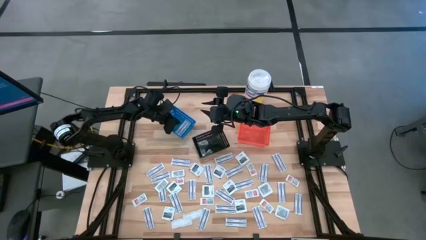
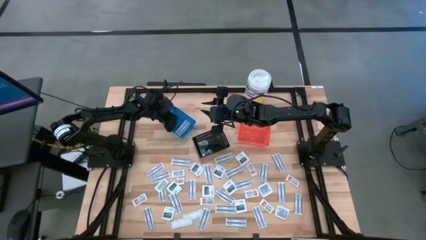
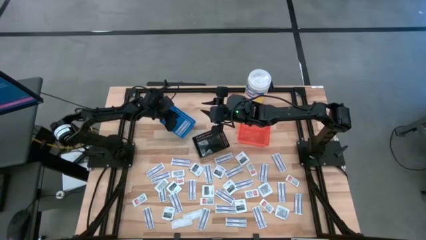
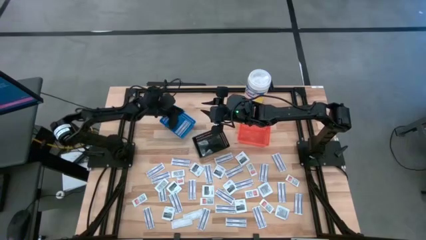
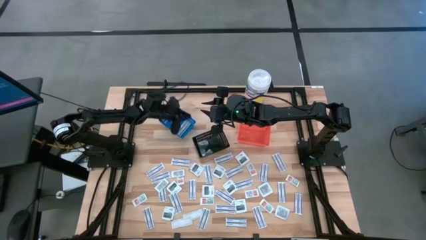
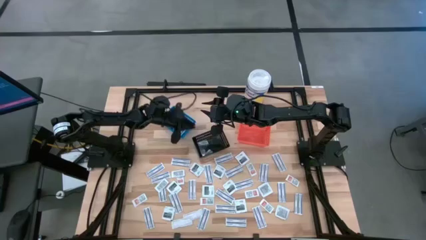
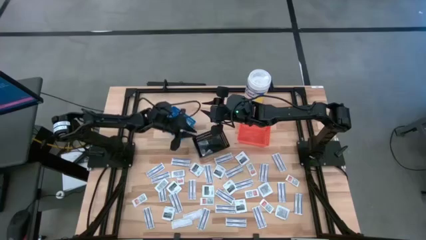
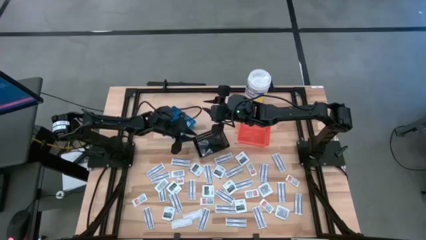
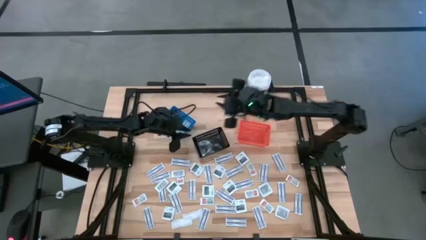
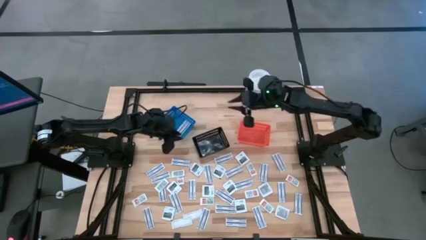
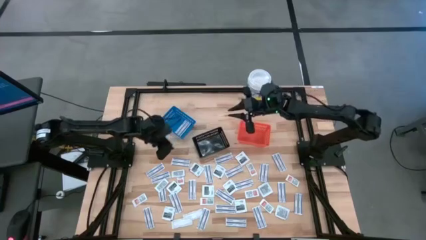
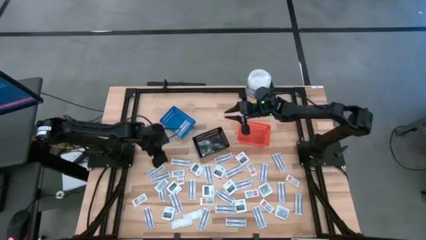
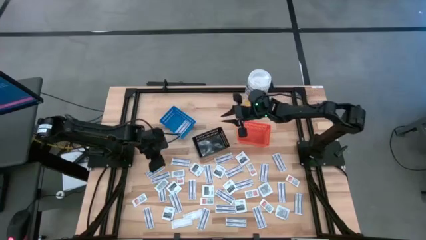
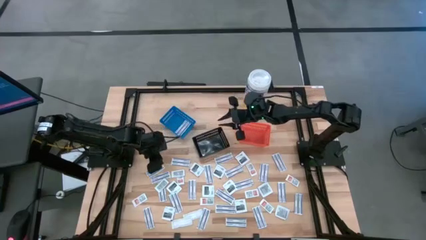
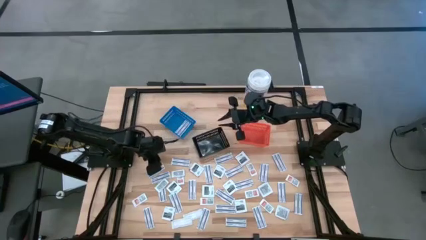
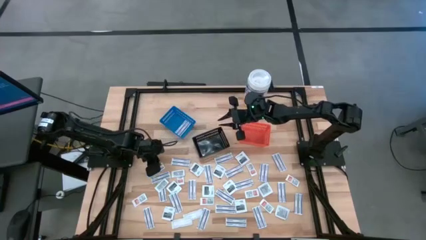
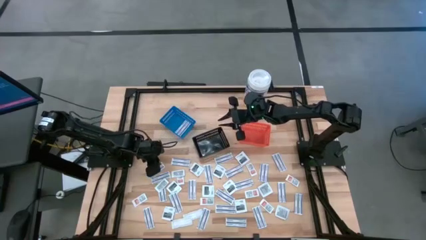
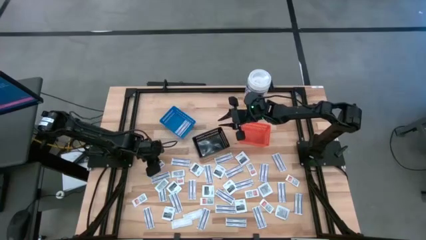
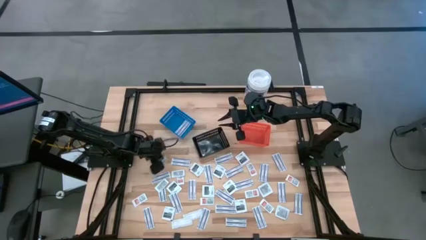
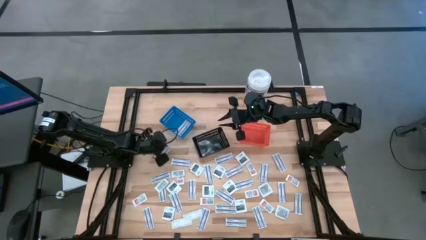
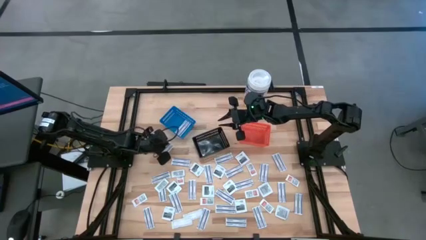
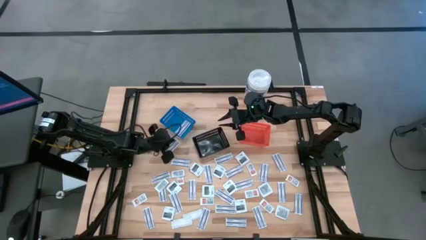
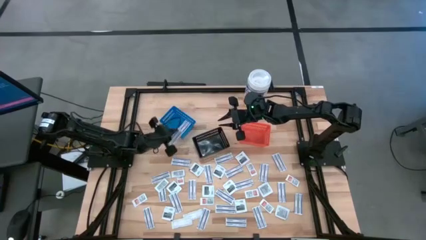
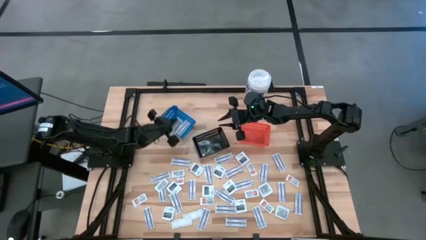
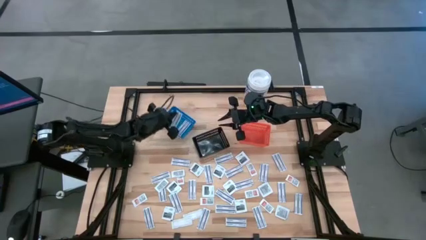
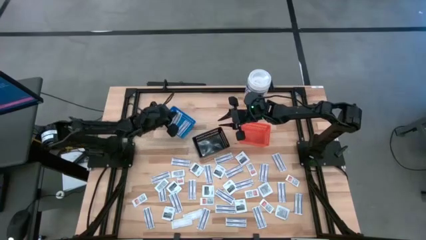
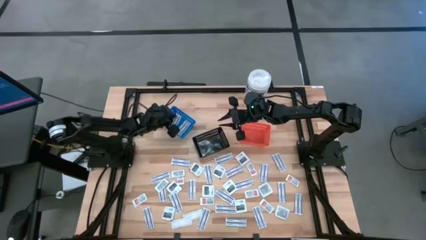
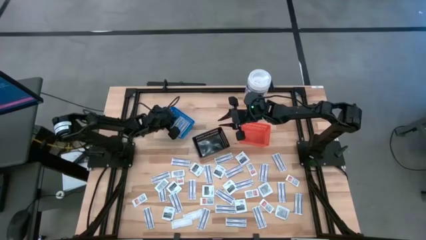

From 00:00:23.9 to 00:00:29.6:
Task: Pick & Place First Aid Supplies
Put the bandage into the blue container

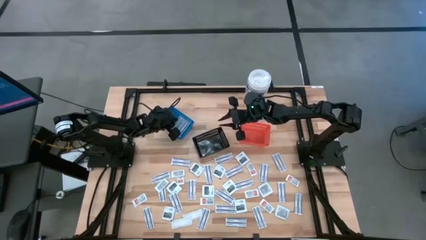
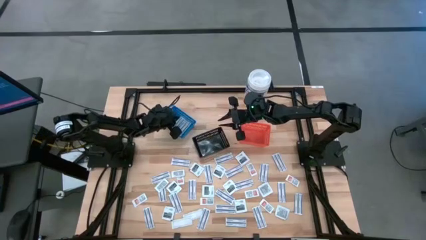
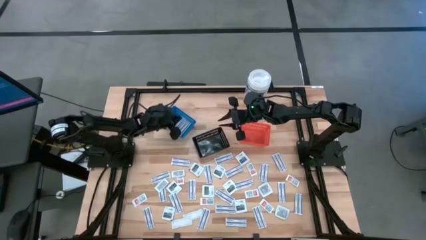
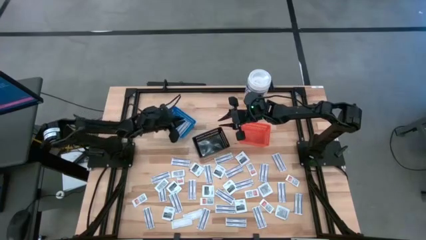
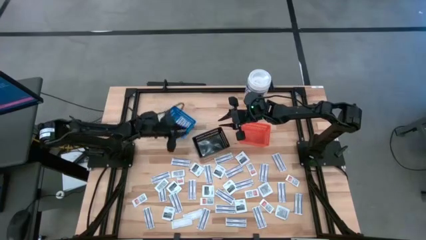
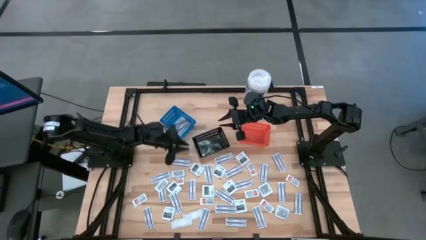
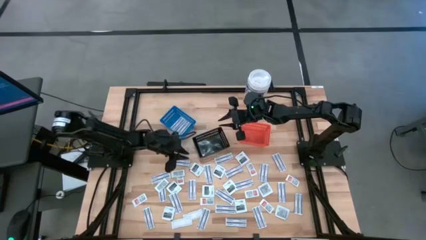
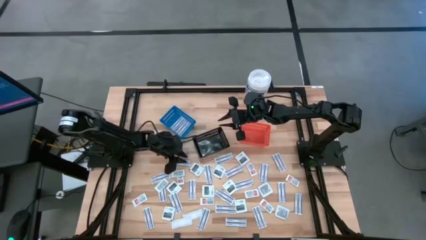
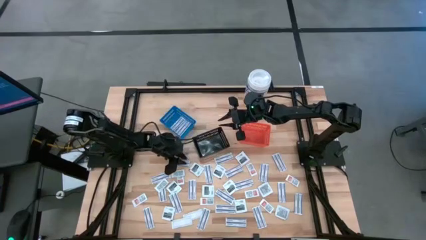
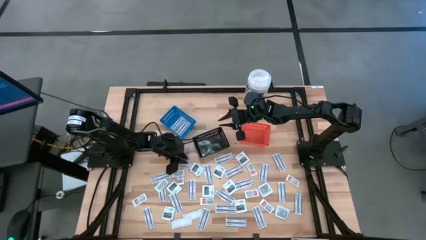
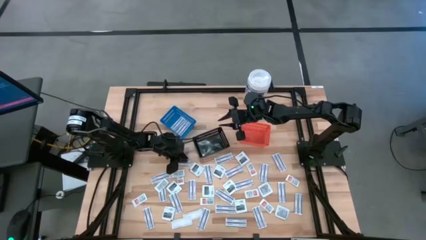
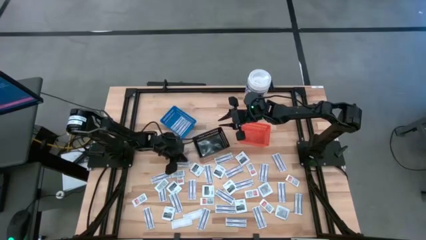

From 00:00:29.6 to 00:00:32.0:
Put the bandage into the blue container

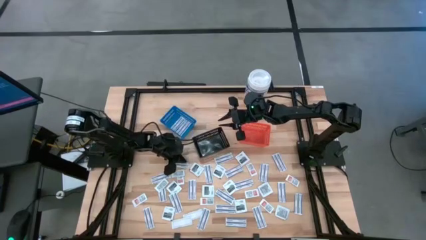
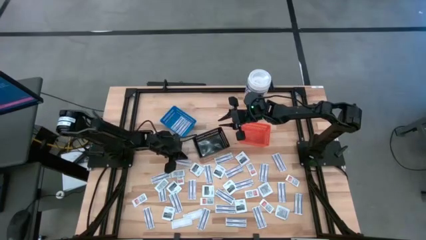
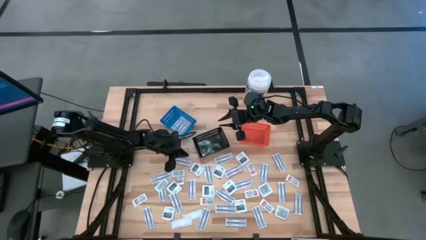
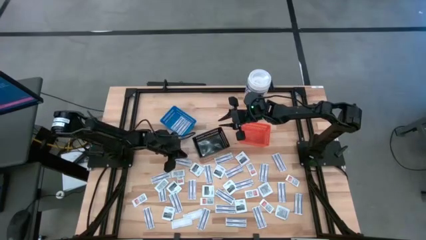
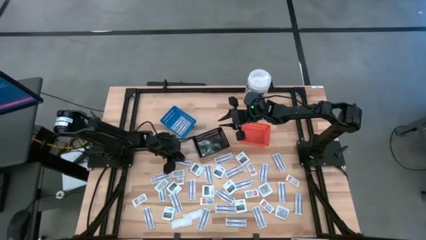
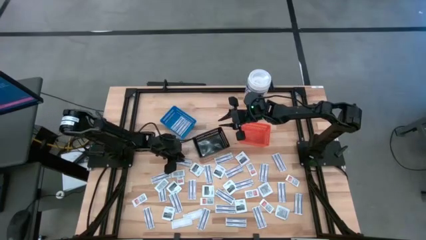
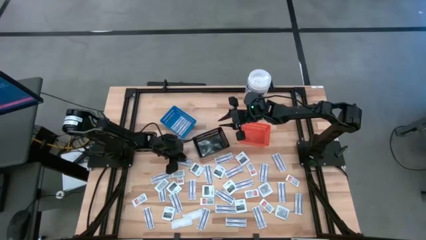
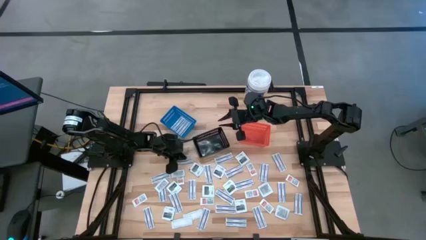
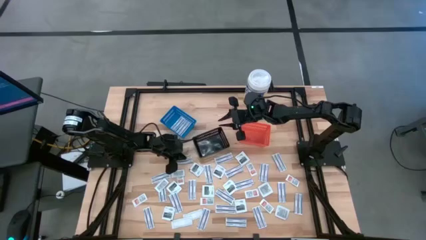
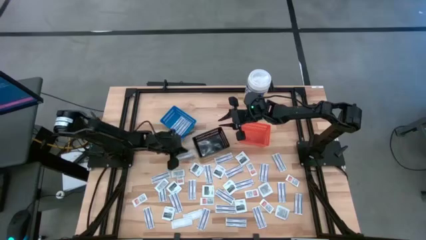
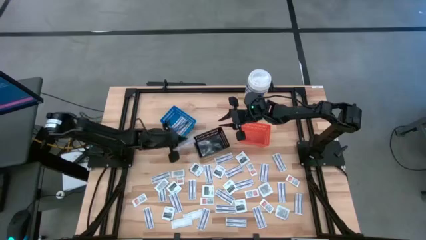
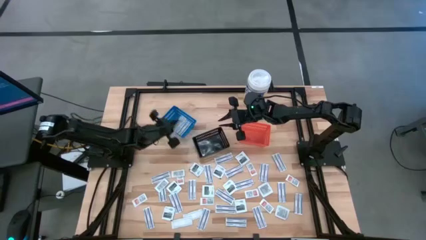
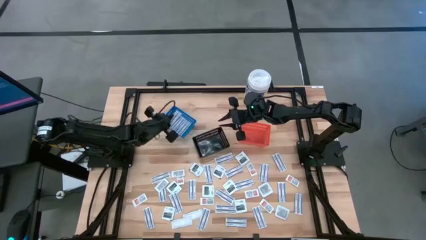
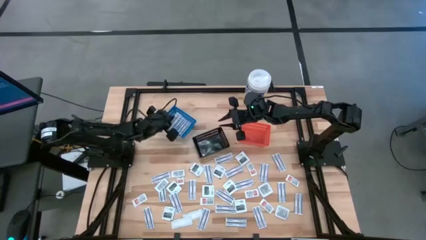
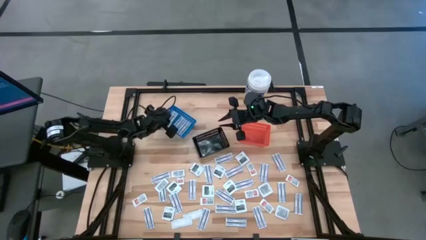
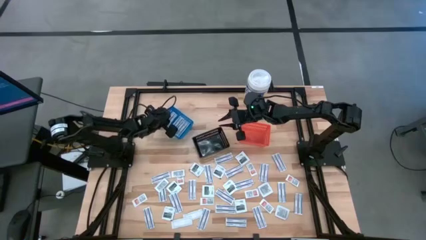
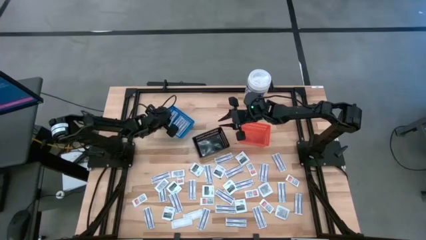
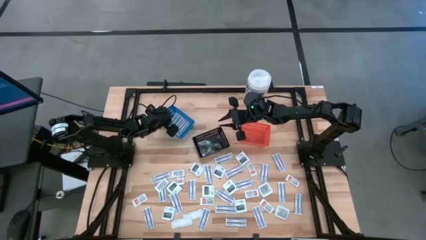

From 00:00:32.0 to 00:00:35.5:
Put the bandage into the blue container

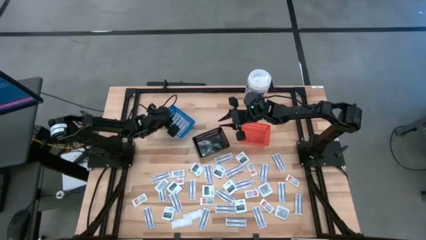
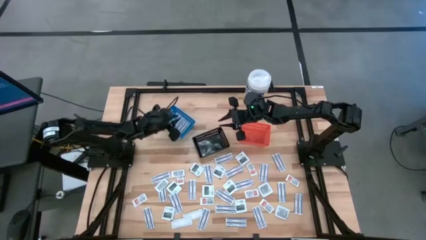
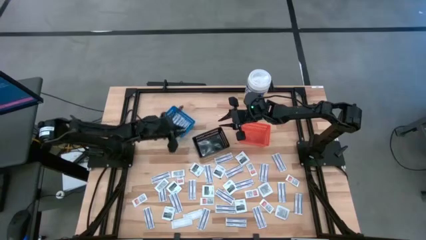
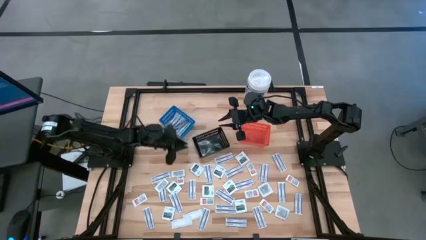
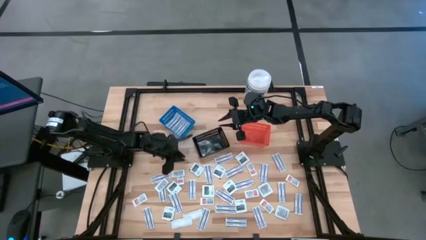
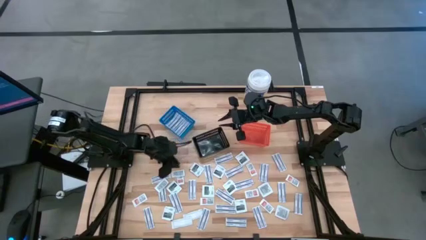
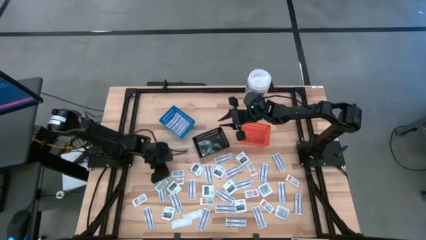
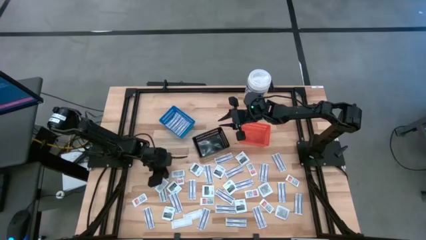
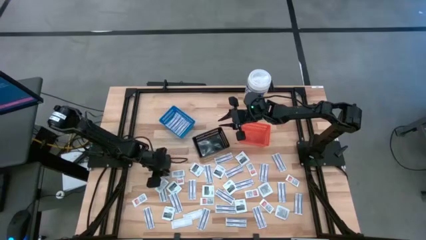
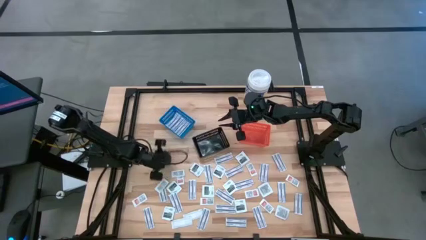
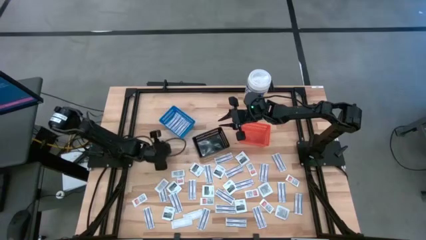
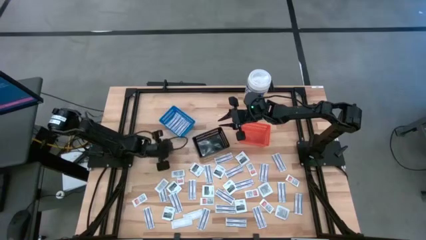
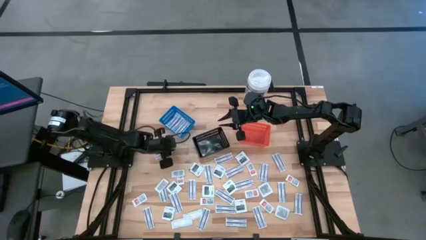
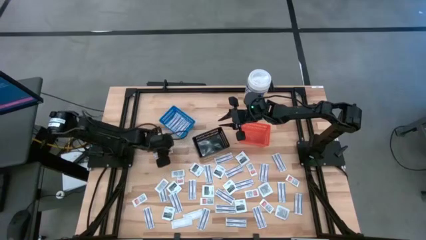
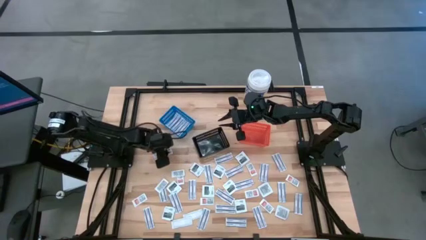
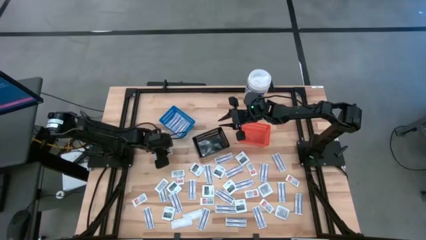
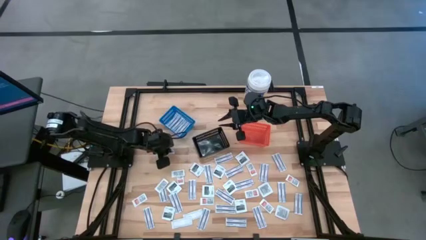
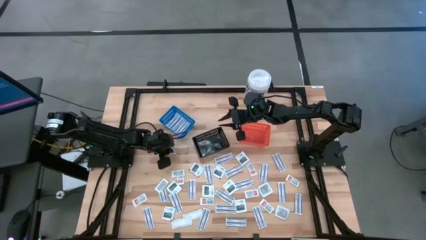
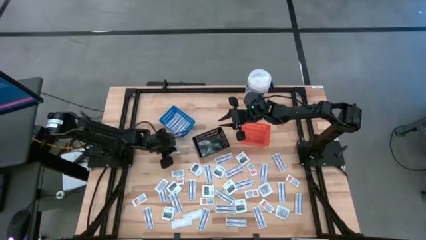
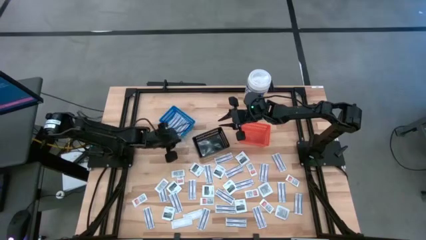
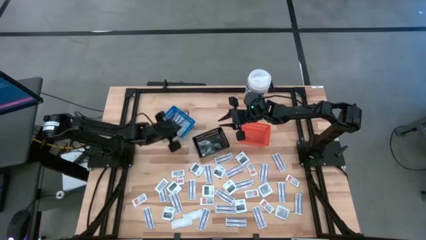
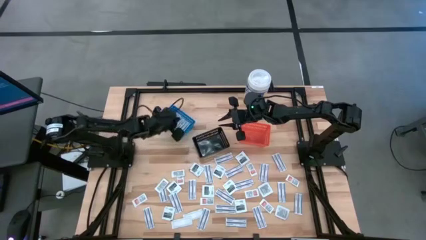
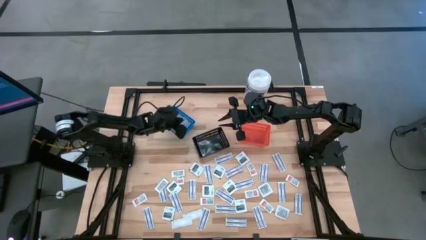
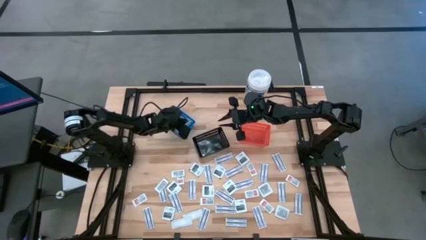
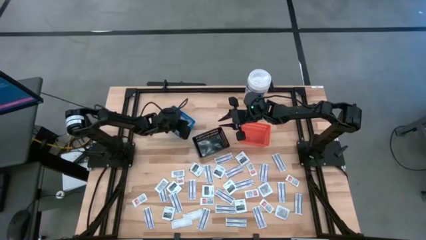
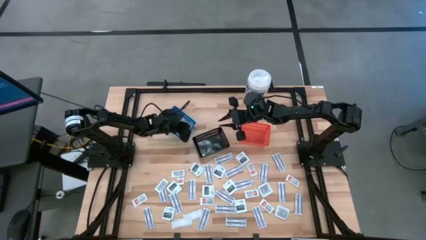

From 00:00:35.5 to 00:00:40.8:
Put the bandage into the blue container
